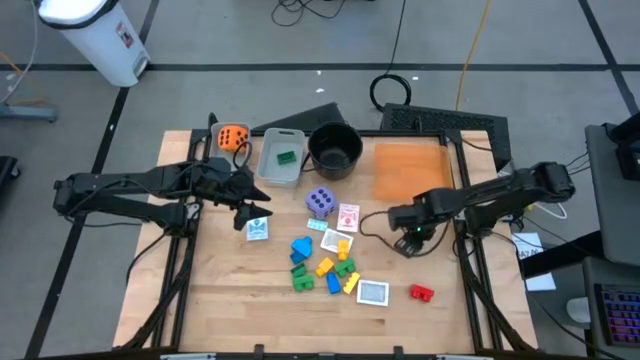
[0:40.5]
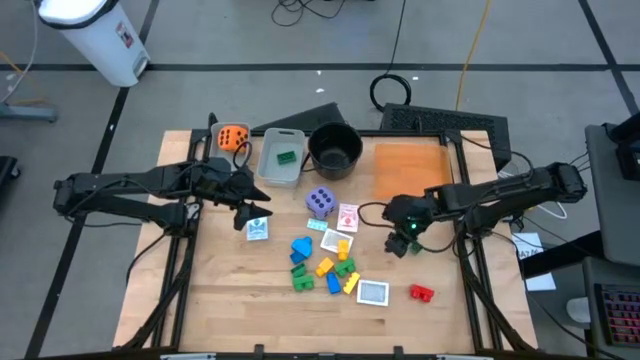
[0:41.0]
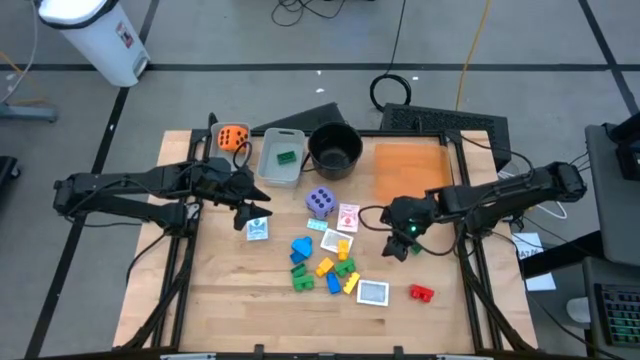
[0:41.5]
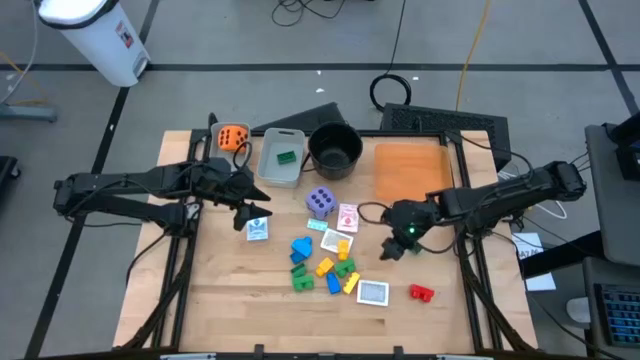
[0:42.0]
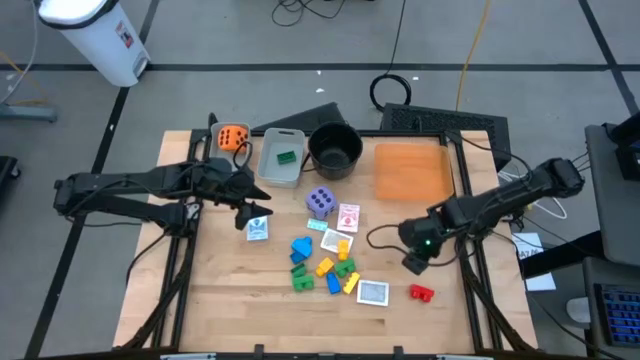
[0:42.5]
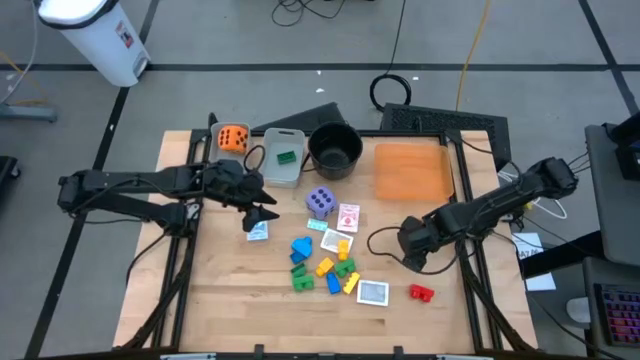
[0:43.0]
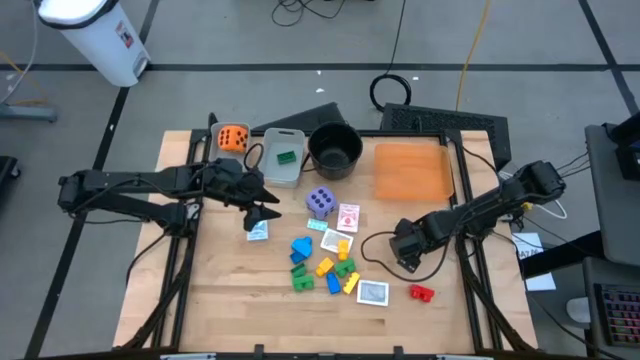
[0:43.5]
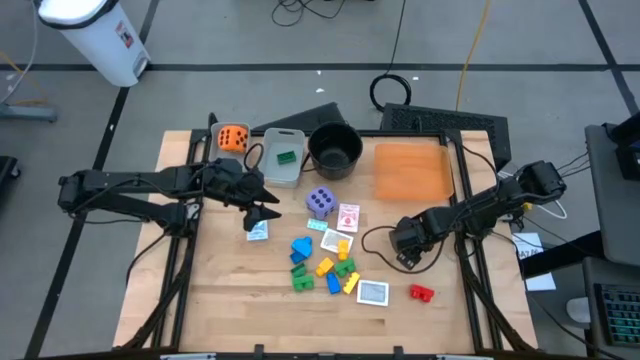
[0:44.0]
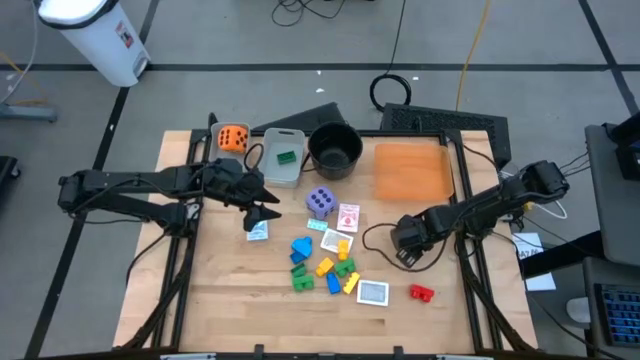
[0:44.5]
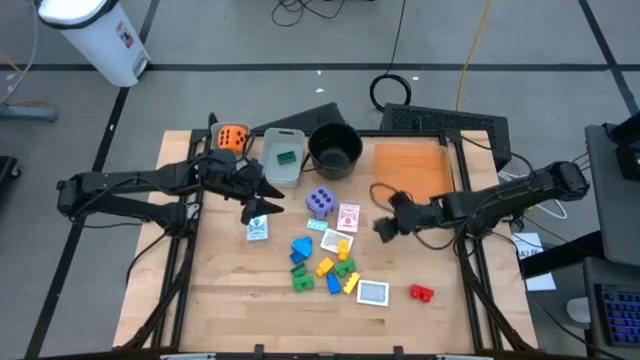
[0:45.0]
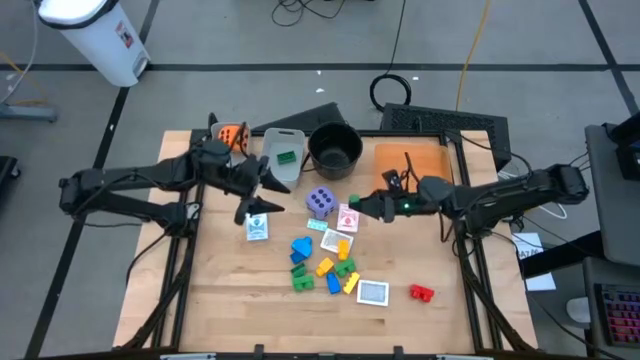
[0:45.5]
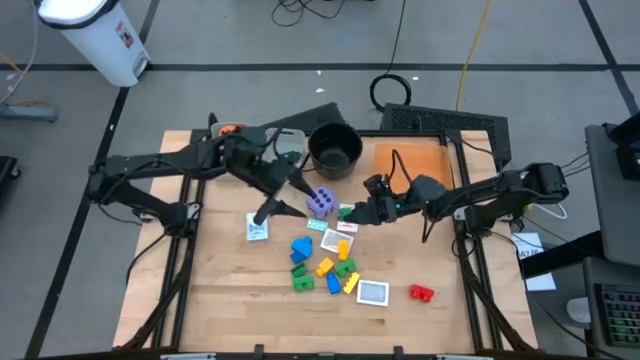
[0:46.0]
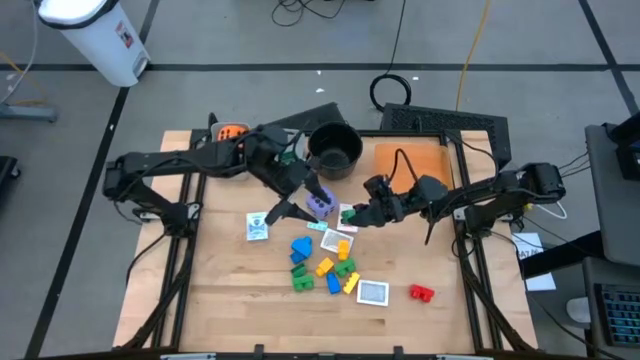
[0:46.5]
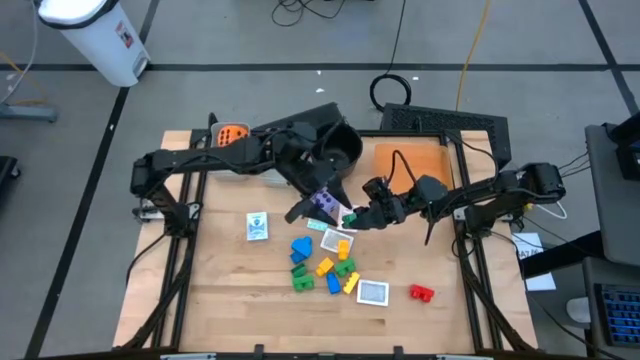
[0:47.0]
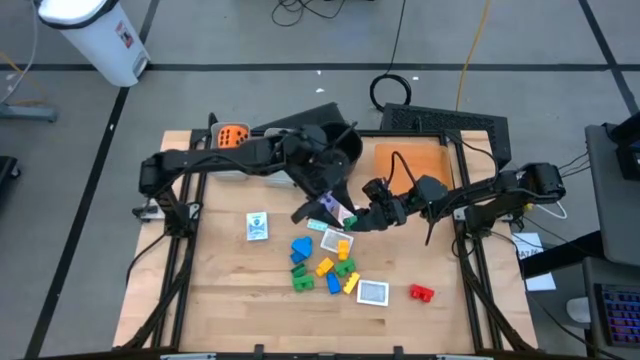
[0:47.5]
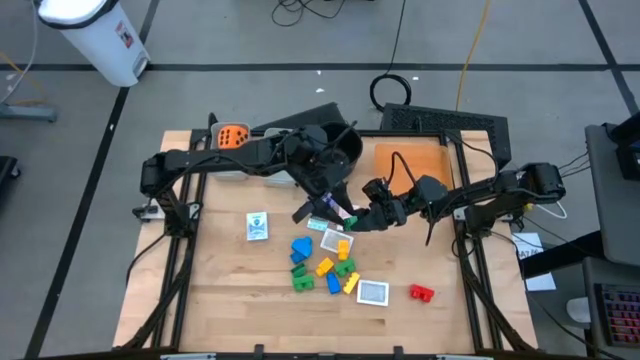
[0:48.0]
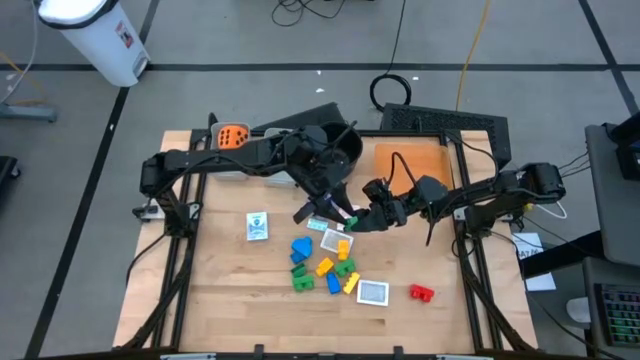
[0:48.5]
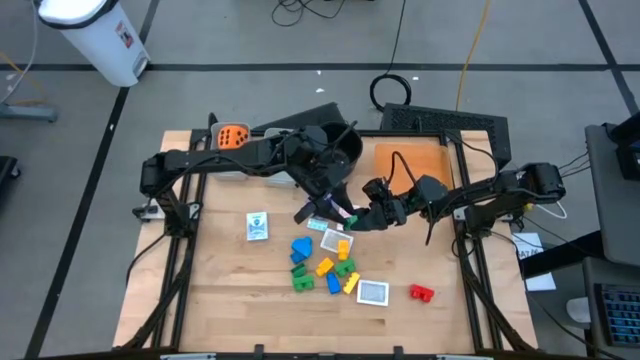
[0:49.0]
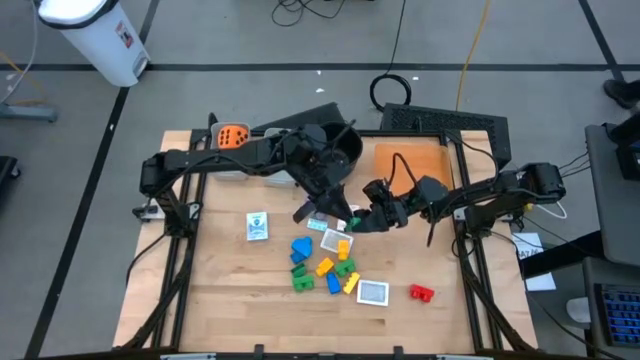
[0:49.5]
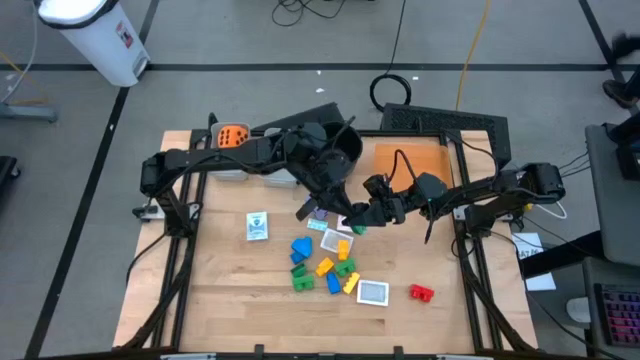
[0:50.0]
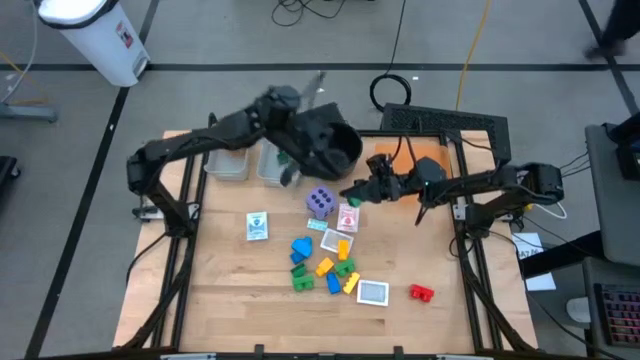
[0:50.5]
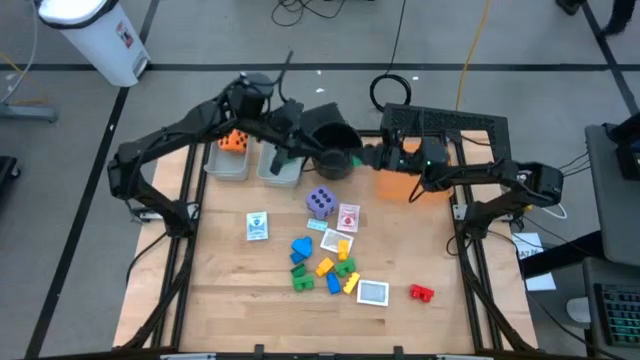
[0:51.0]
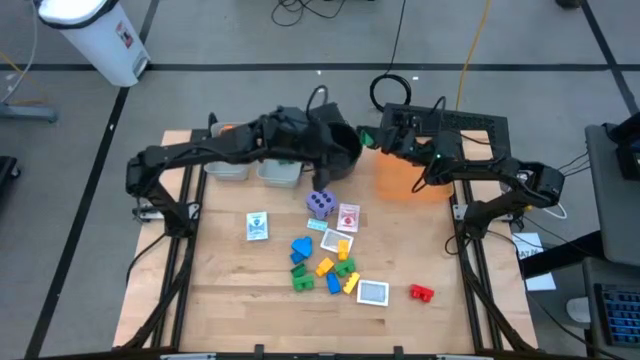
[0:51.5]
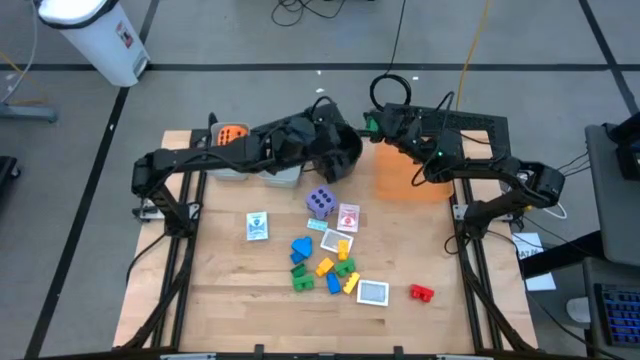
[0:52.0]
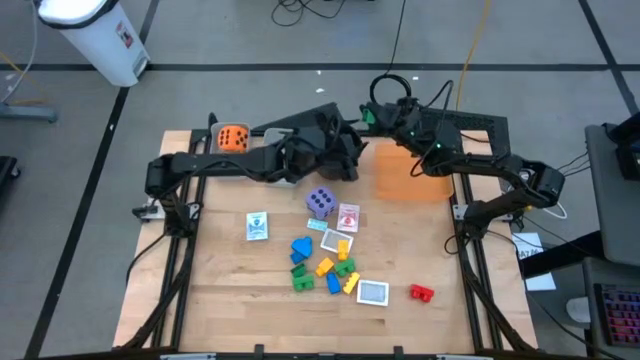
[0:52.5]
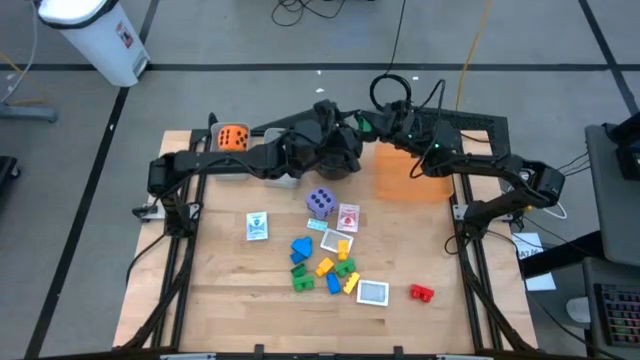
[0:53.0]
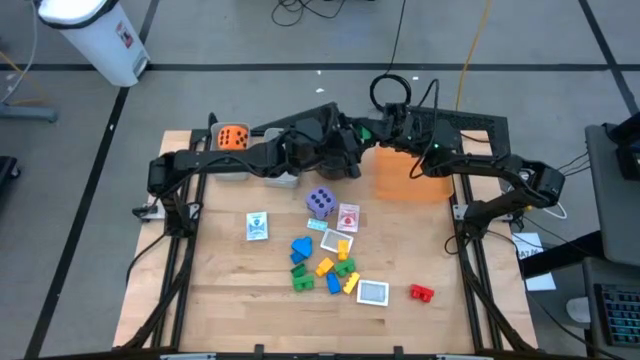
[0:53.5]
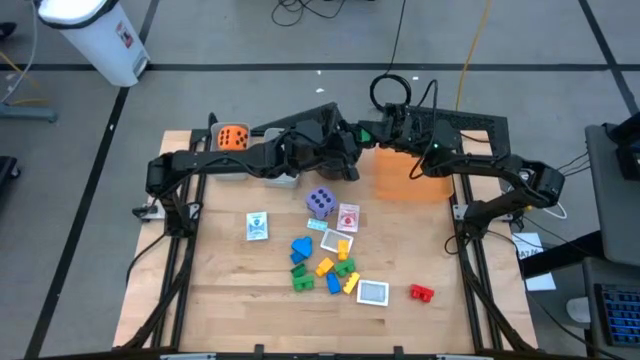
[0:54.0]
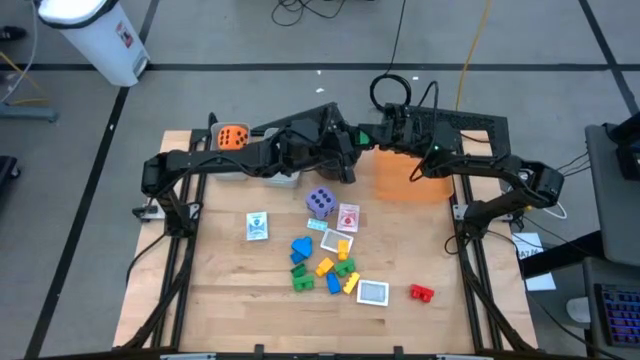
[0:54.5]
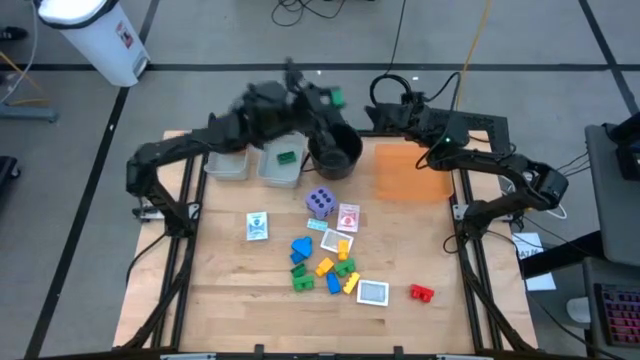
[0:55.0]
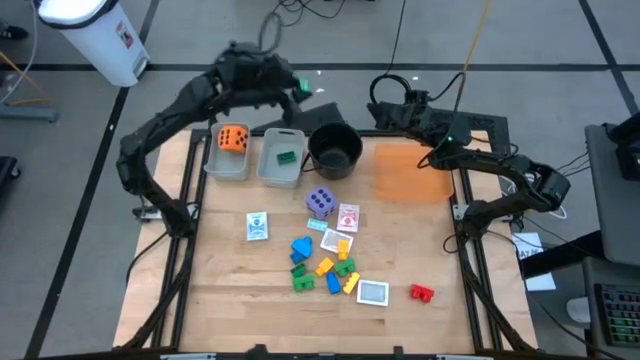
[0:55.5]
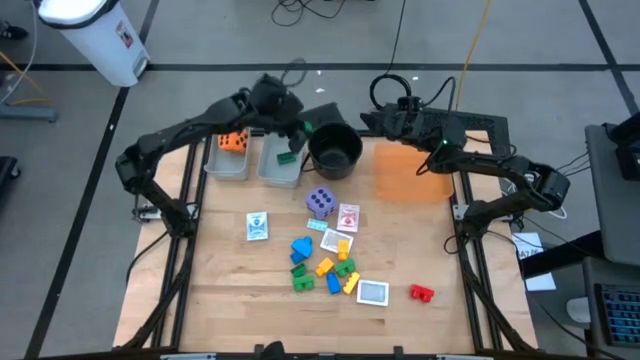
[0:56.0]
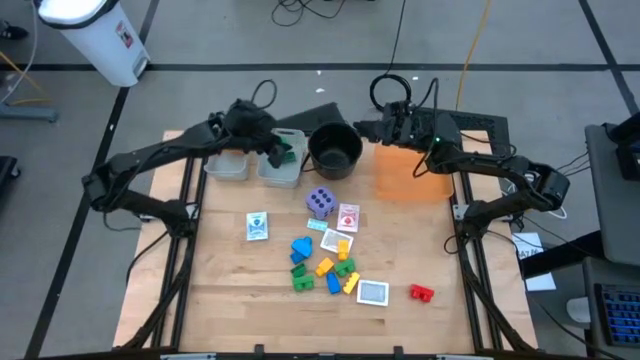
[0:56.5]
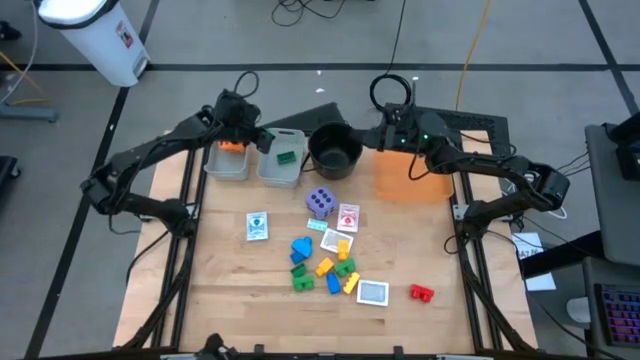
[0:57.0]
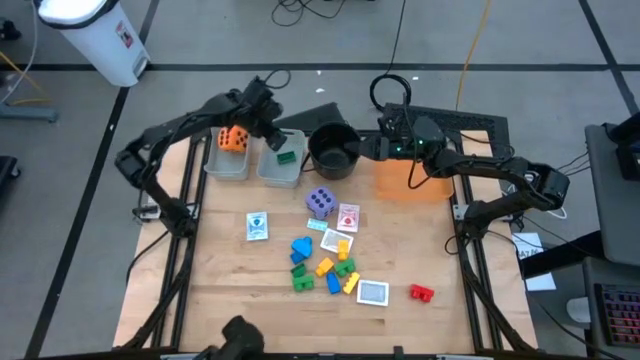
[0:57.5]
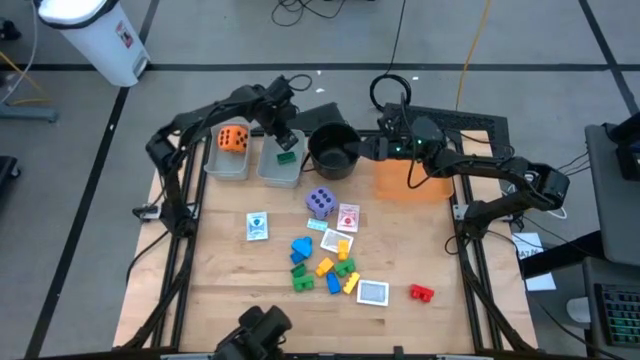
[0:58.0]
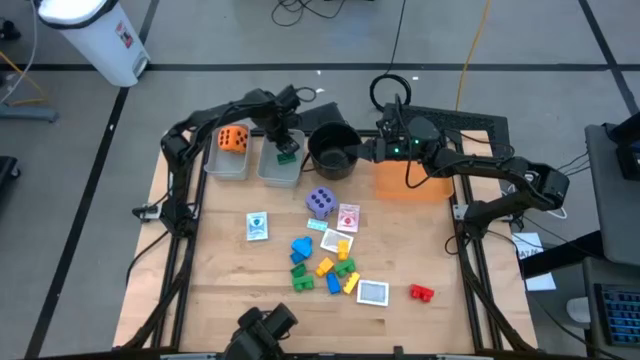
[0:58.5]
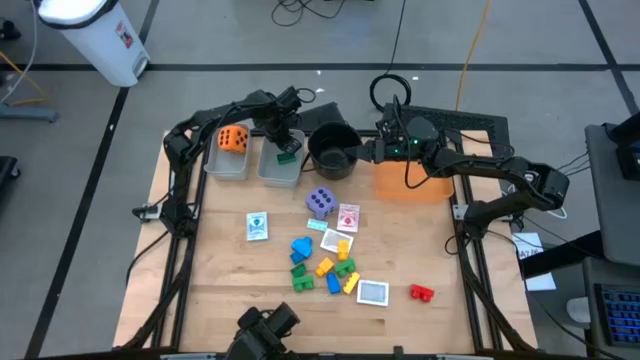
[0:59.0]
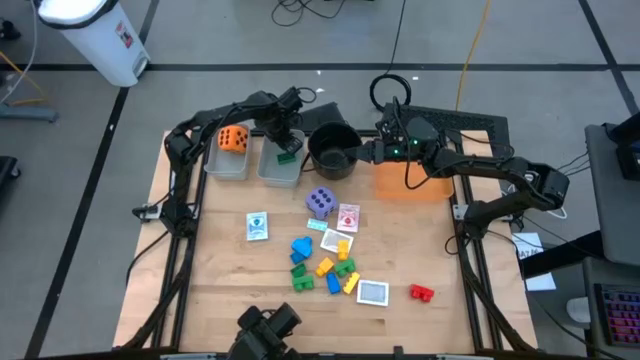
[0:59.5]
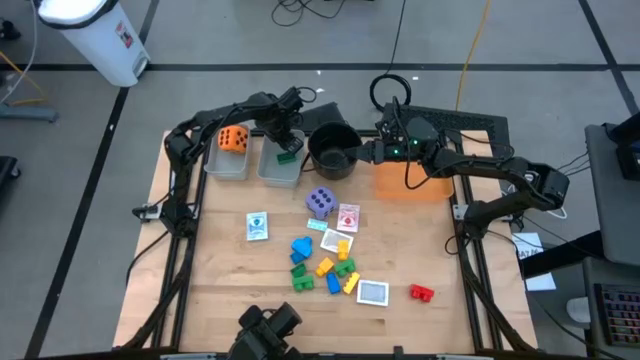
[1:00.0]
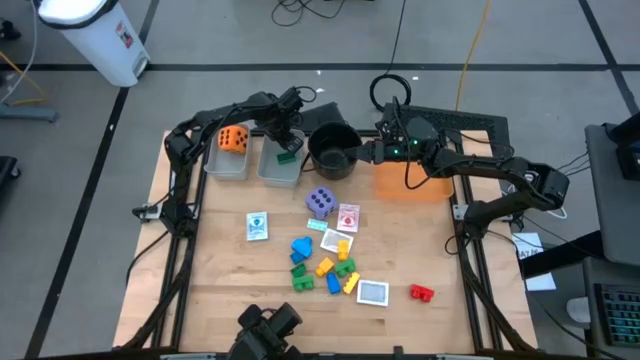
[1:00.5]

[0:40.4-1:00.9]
Task: Pick & Place Toys
Put the green game piece into the right gray bin
